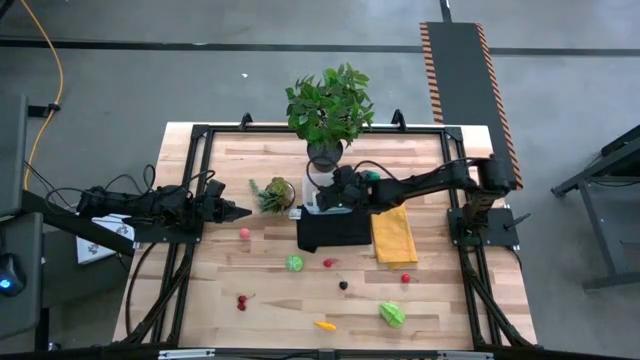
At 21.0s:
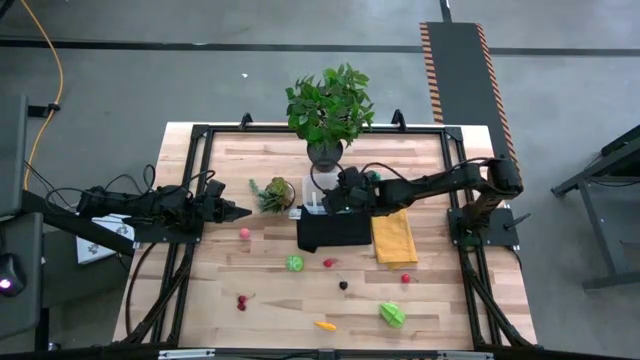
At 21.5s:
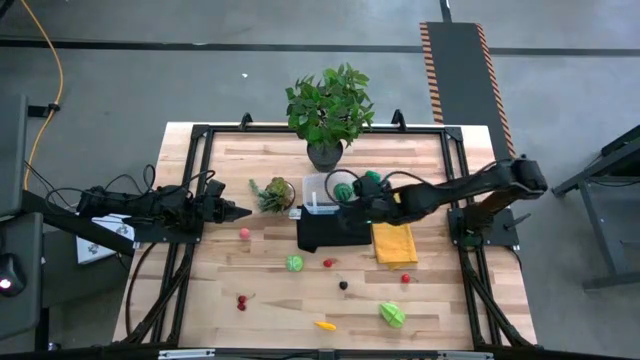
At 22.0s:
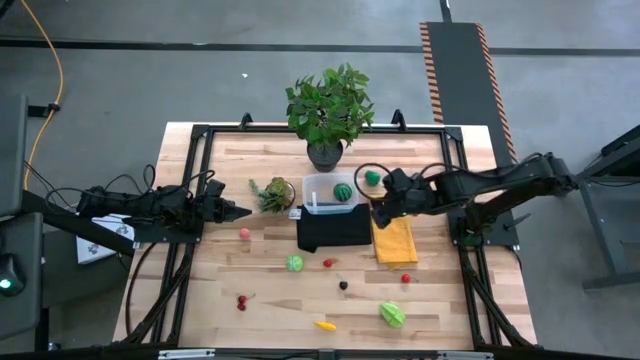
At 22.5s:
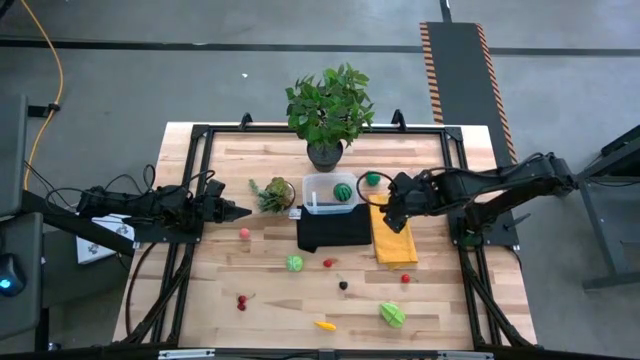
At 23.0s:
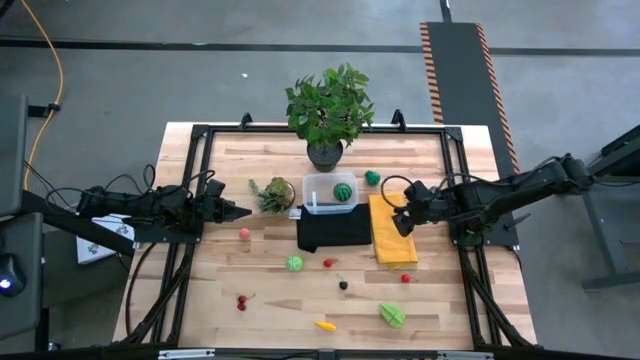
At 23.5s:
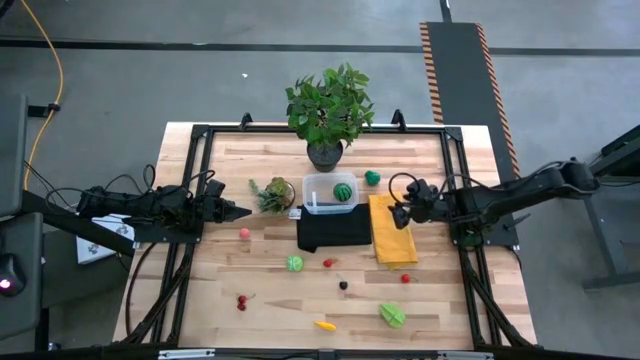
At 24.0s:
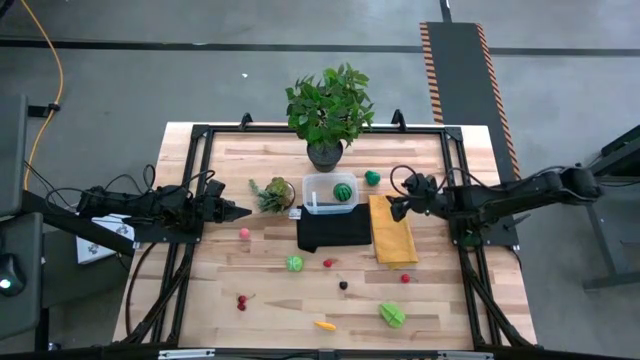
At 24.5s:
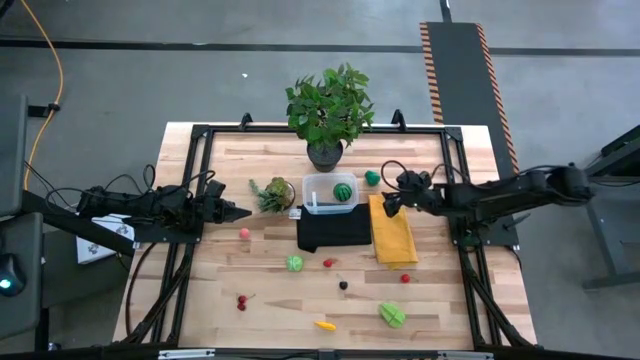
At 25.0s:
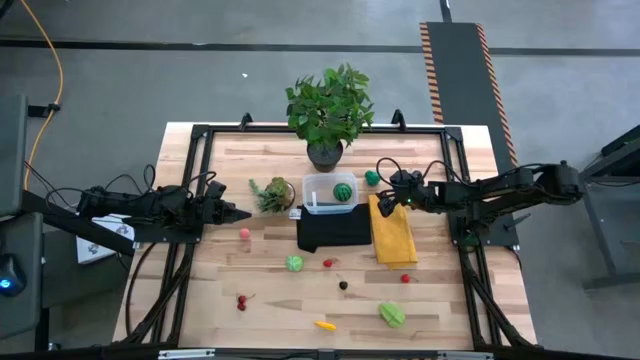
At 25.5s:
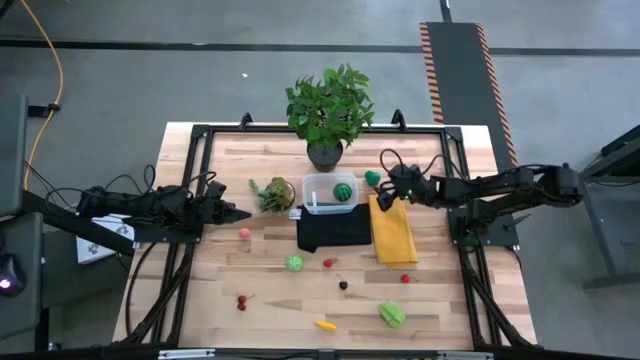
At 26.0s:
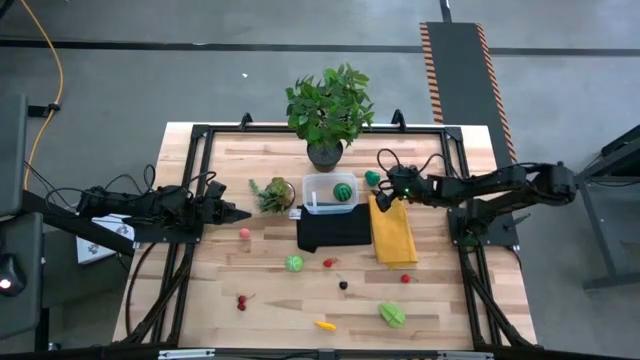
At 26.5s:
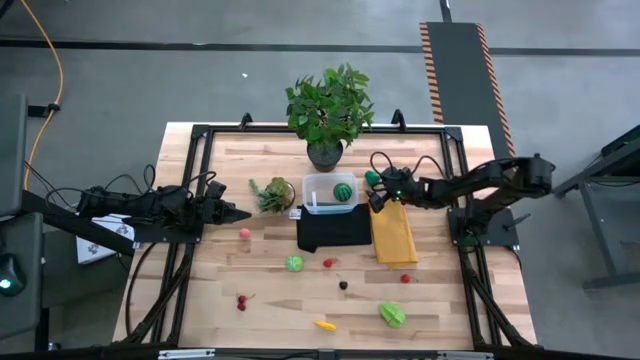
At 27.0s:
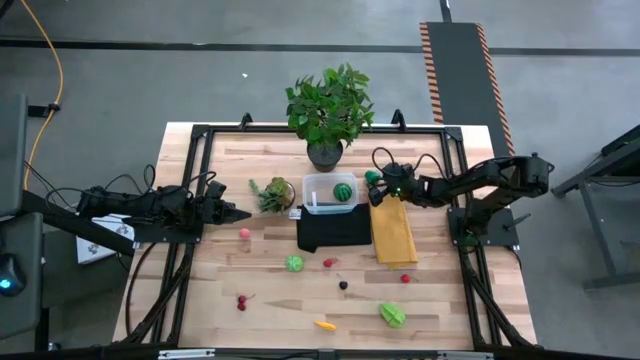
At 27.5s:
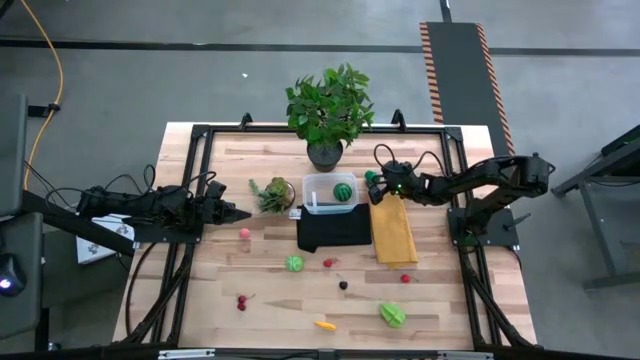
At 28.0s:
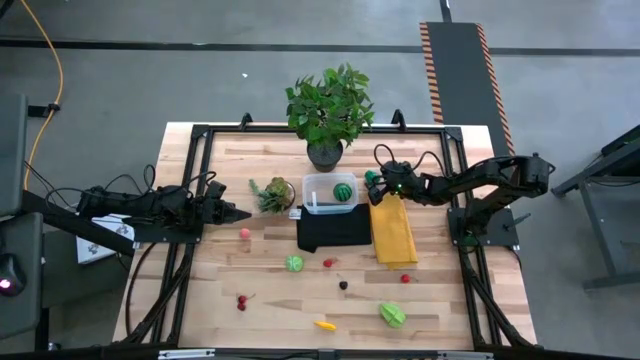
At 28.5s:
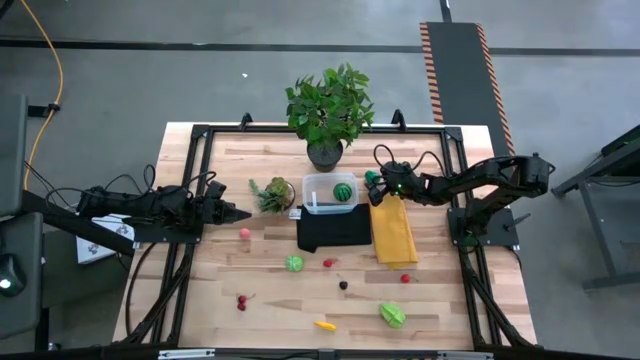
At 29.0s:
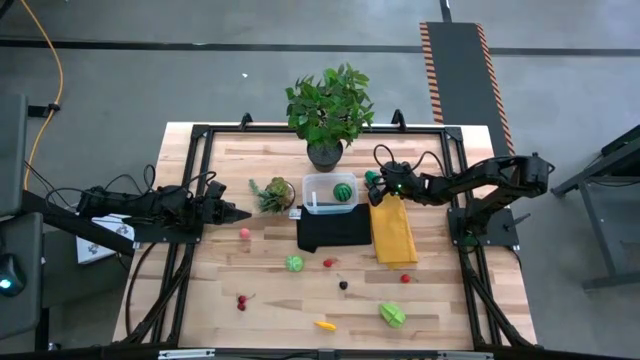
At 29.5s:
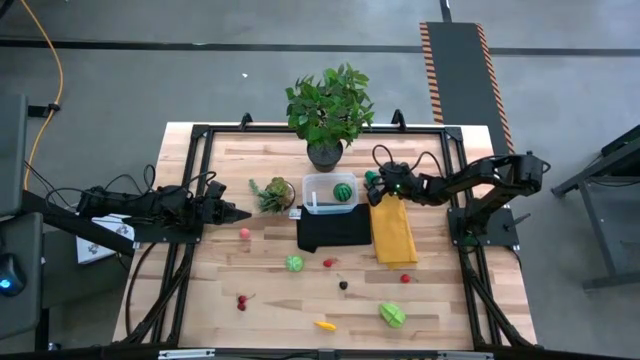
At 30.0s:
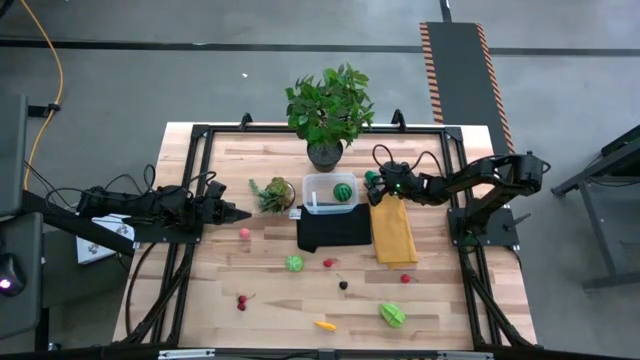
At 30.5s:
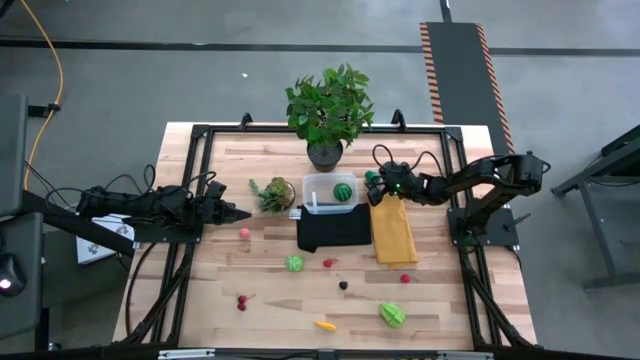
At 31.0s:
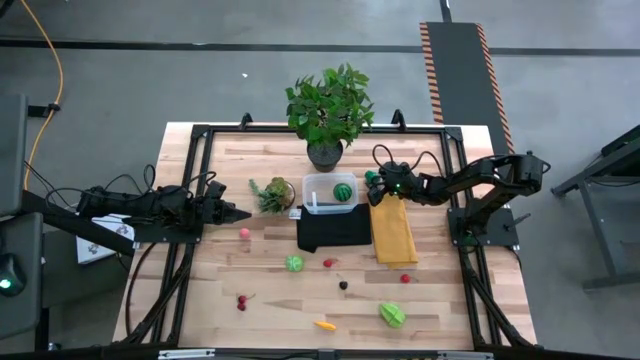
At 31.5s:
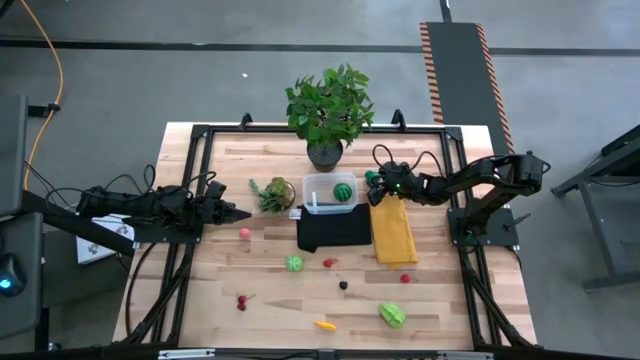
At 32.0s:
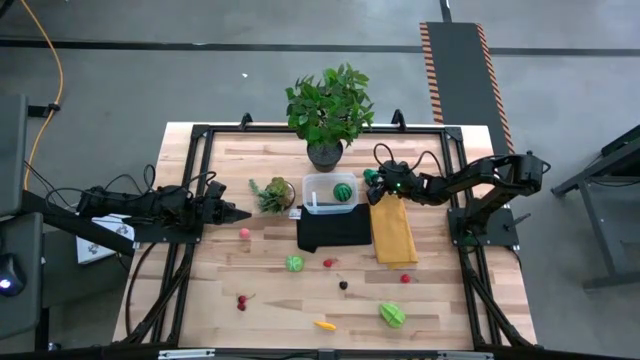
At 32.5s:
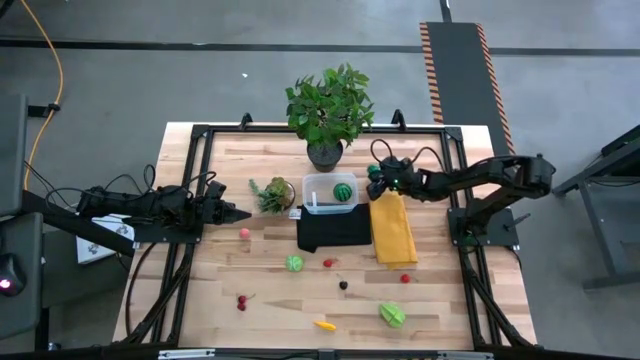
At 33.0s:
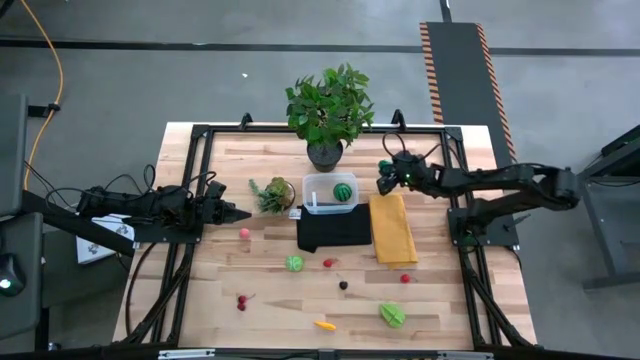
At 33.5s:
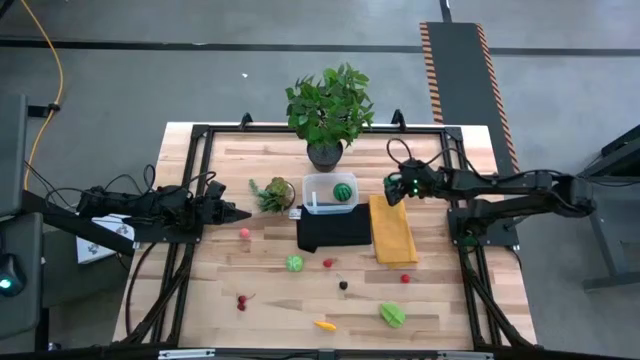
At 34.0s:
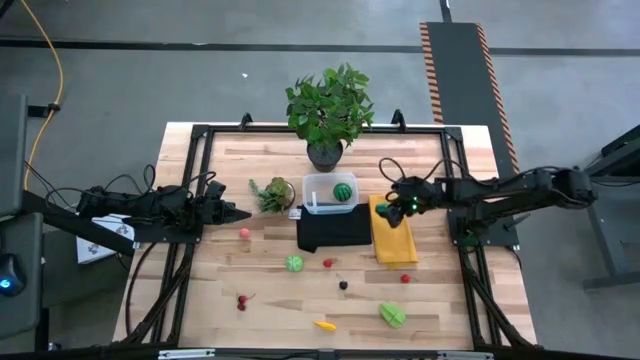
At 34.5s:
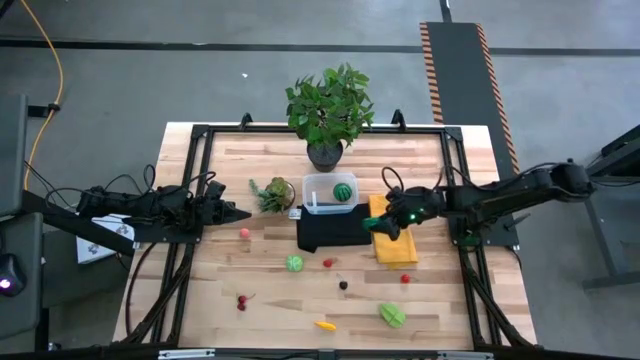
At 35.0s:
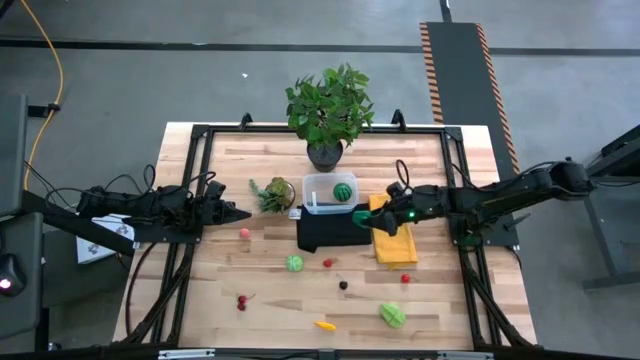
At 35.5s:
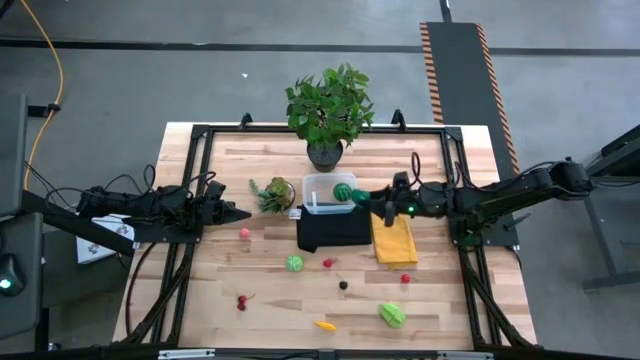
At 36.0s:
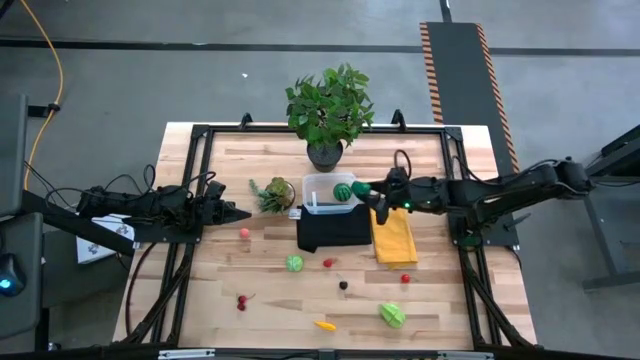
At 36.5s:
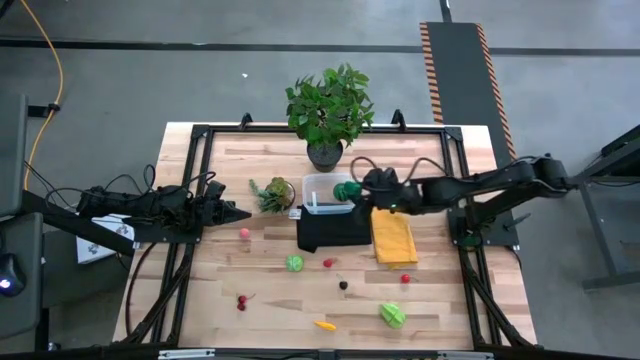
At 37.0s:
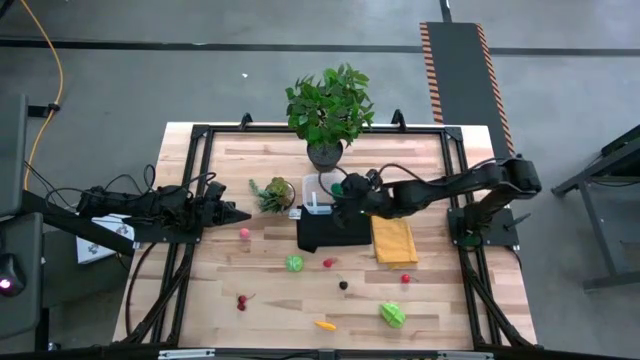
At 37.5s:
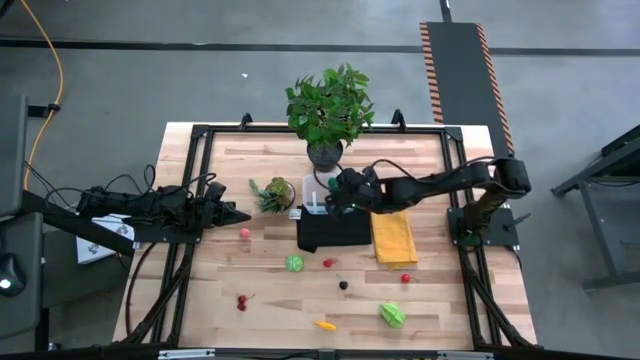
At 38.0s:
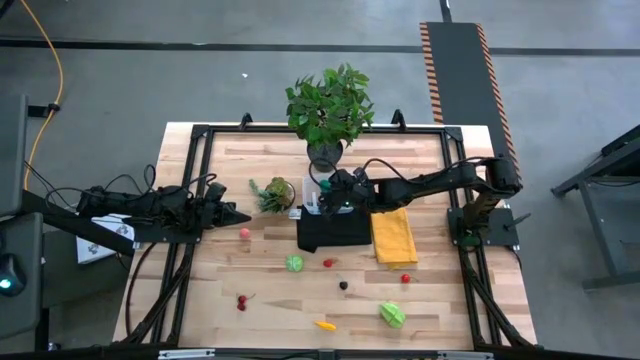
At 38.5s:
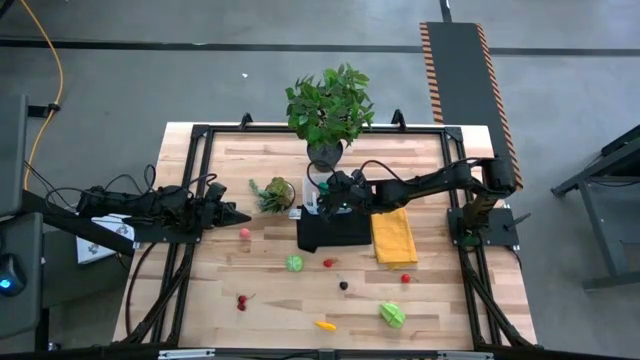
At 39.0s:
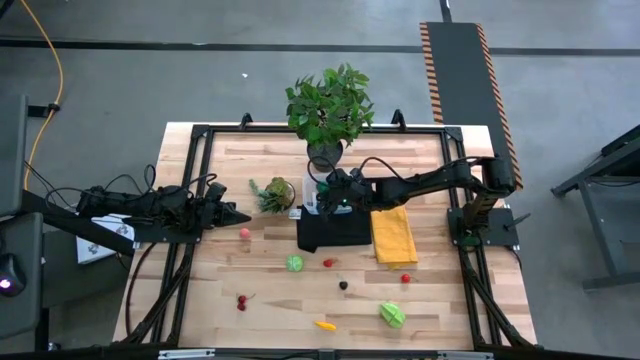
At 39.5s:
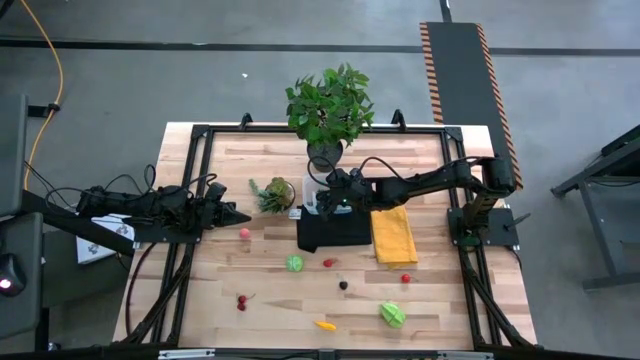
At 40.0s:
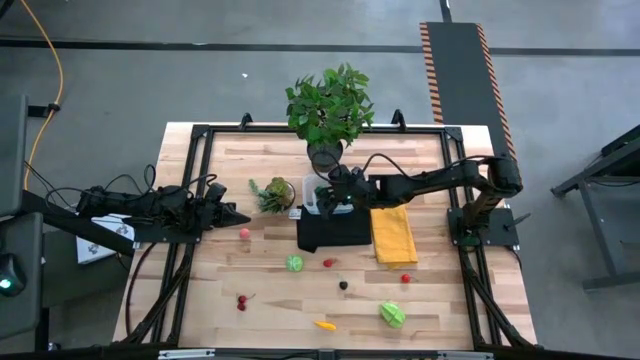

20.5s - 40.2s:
Task: Pick and placing Produce into tupperware
Put the green bell pepper into the transparent bin

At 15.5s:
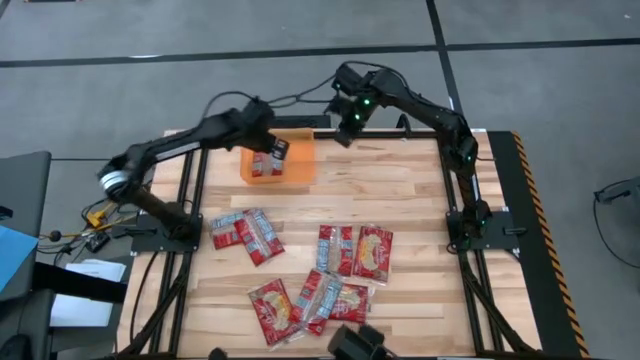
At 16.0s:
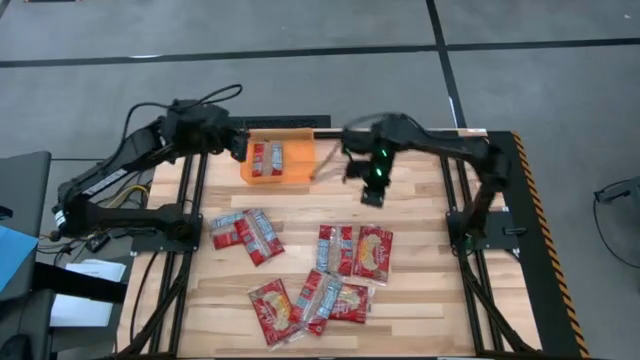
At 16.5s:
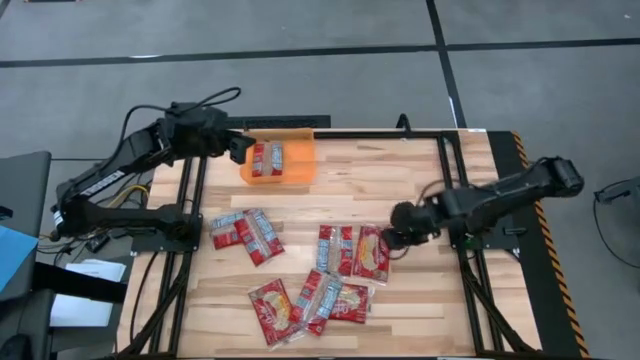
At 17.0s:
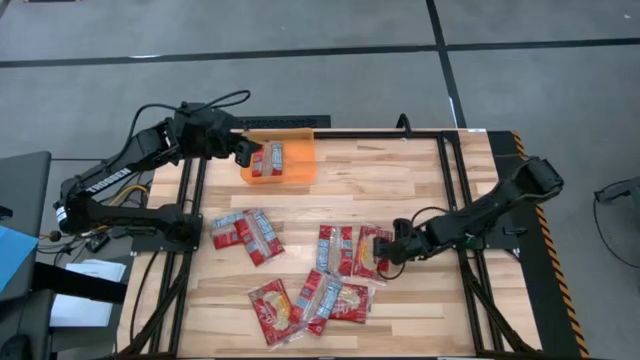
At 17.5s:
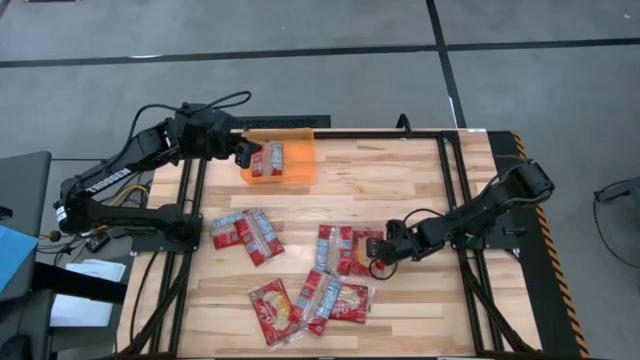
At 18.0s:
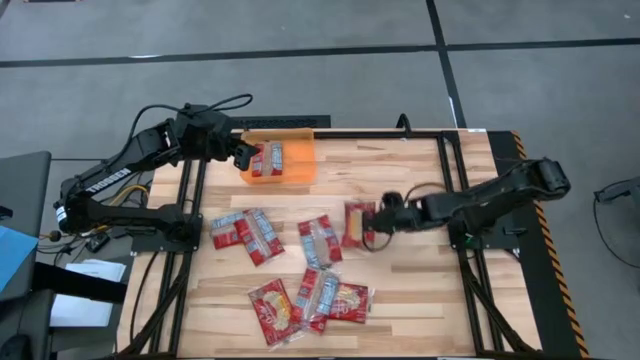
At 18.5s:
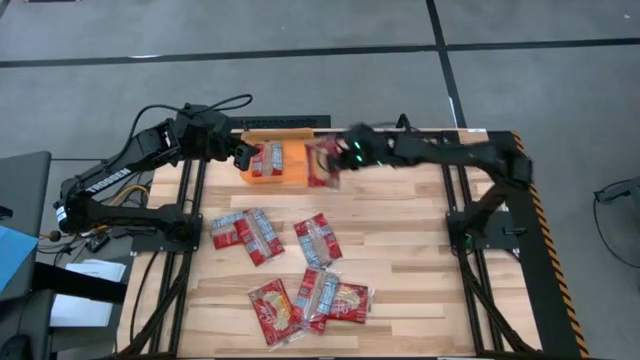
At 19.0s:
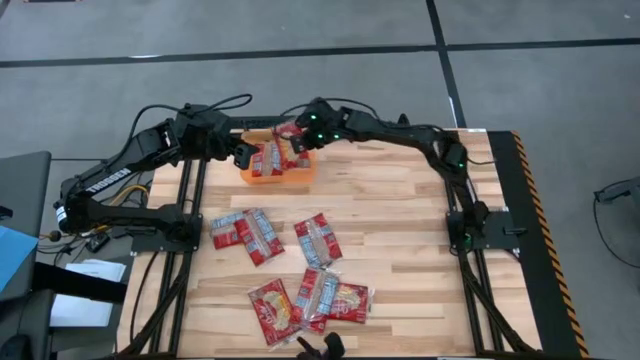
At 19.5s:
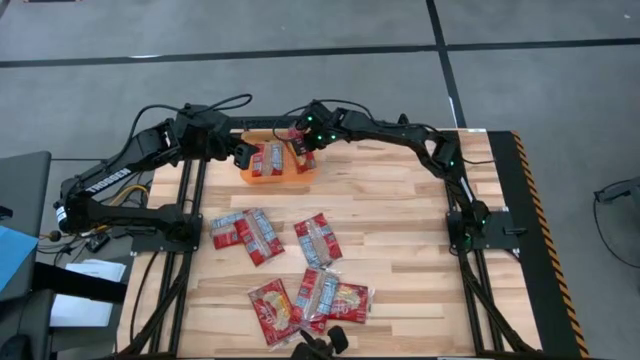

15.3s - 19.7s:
Task: Sort popcorn bags into baskets
Put the popcorn bag into the orange bin
